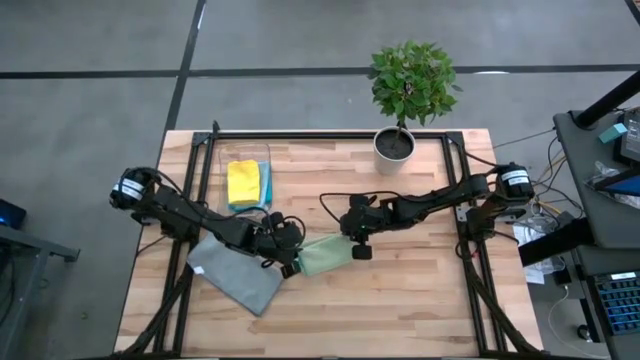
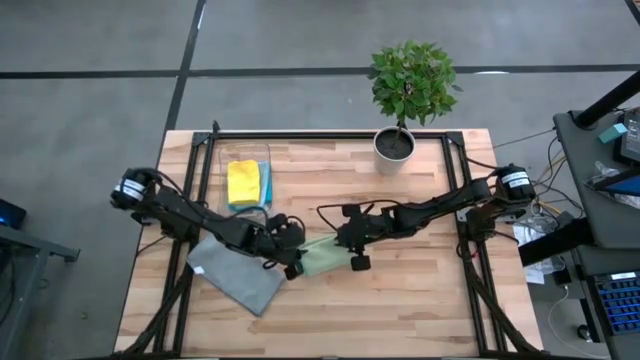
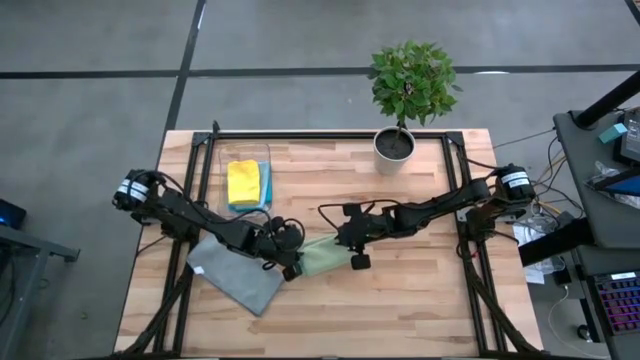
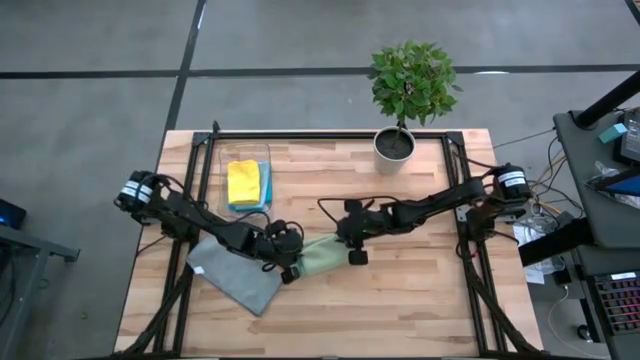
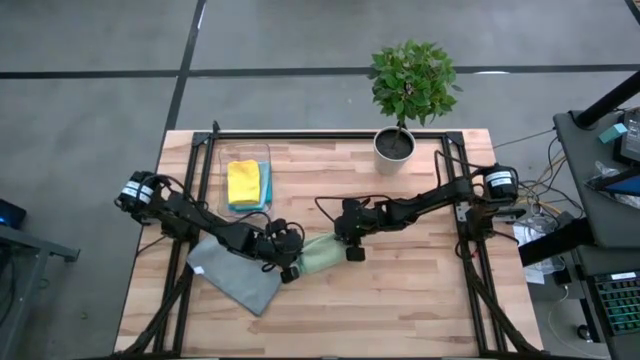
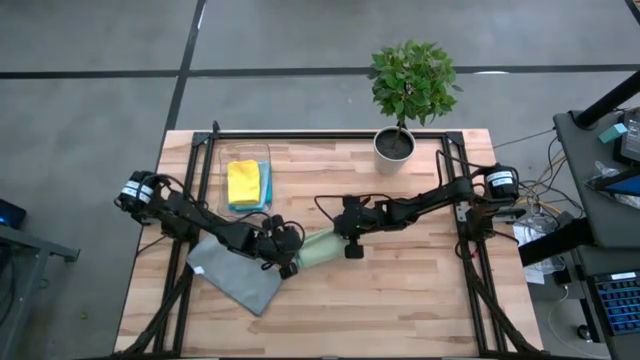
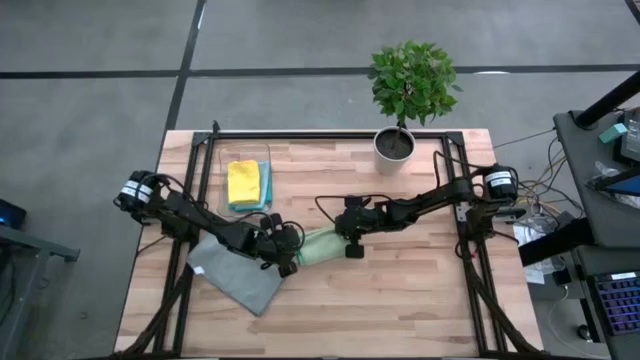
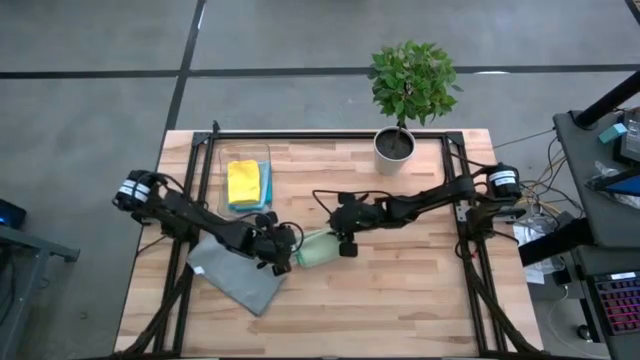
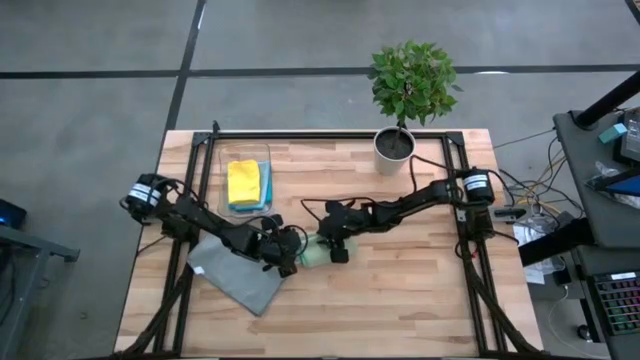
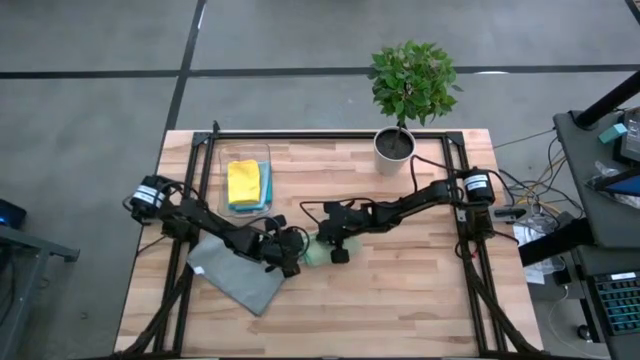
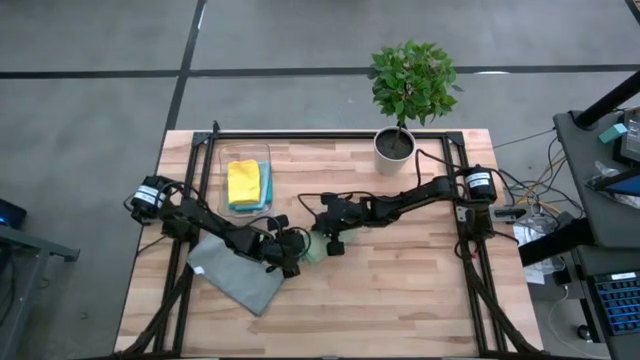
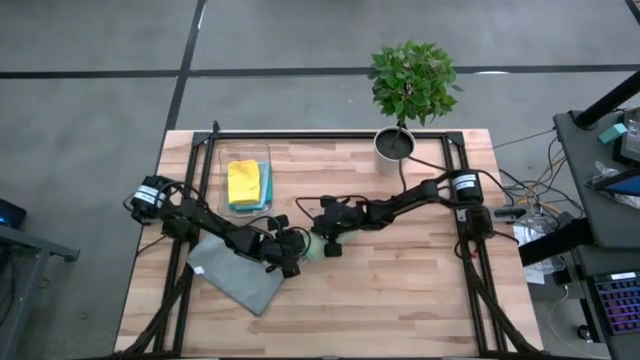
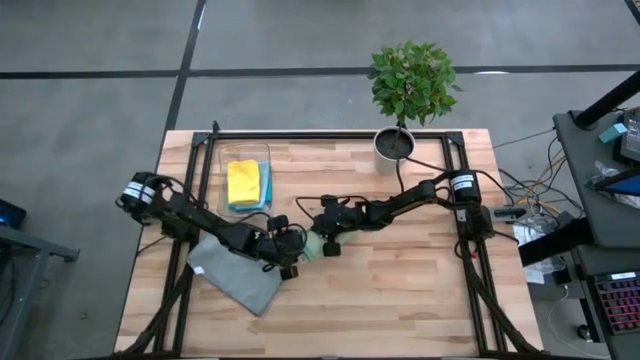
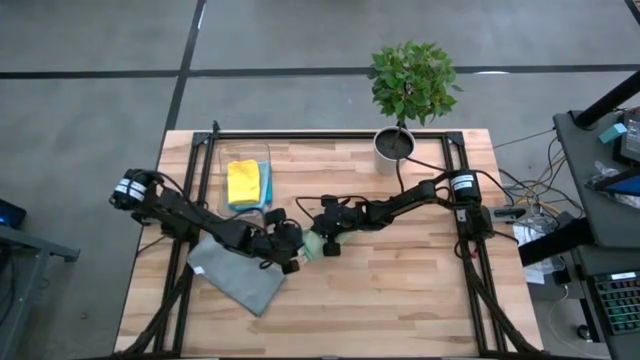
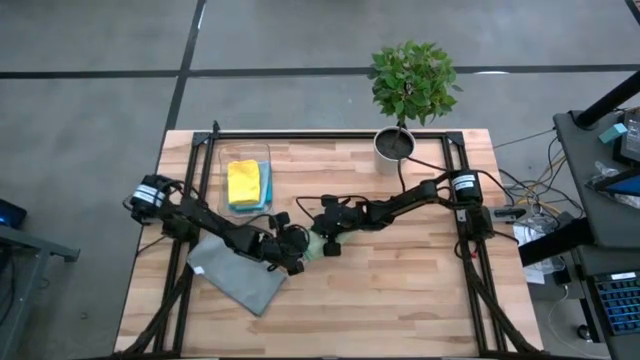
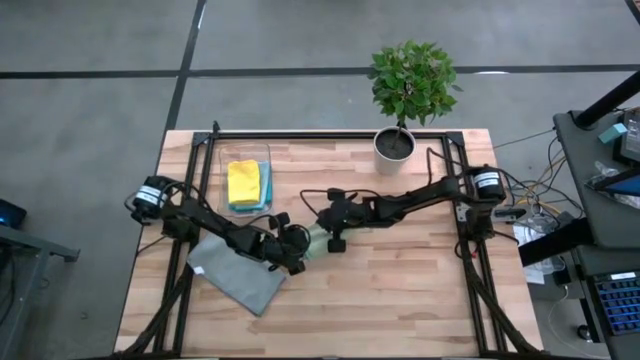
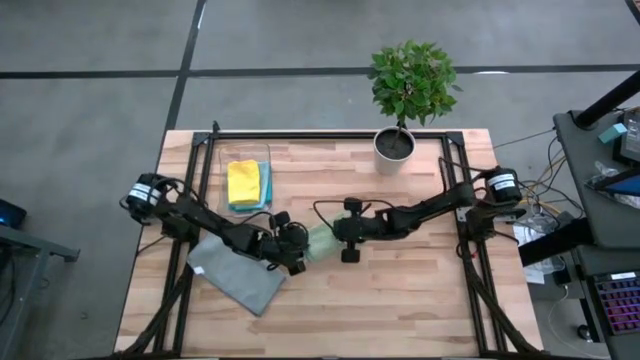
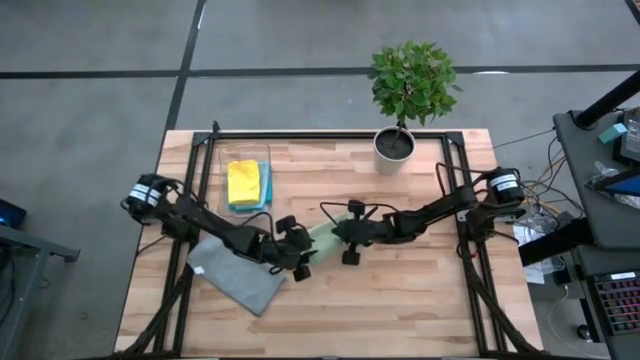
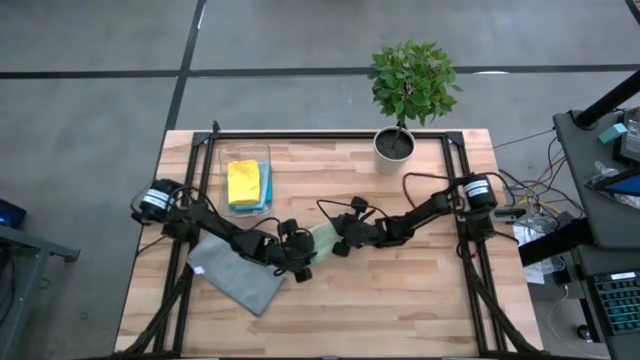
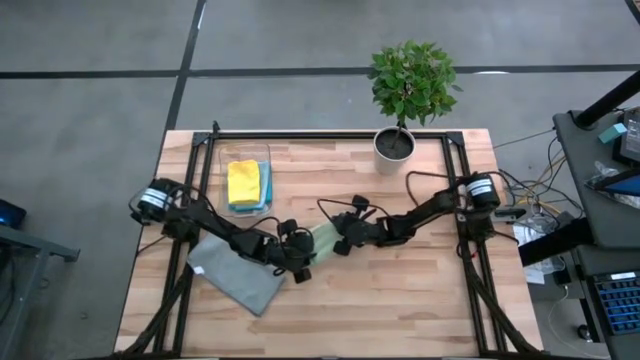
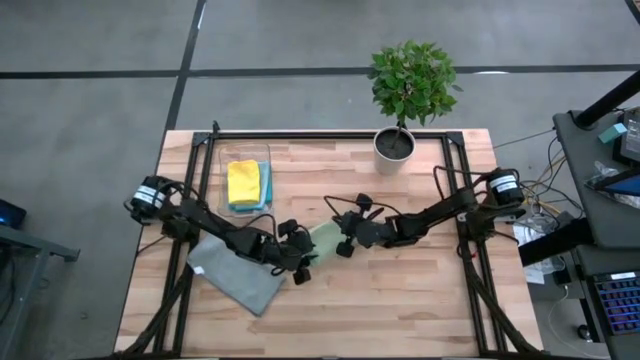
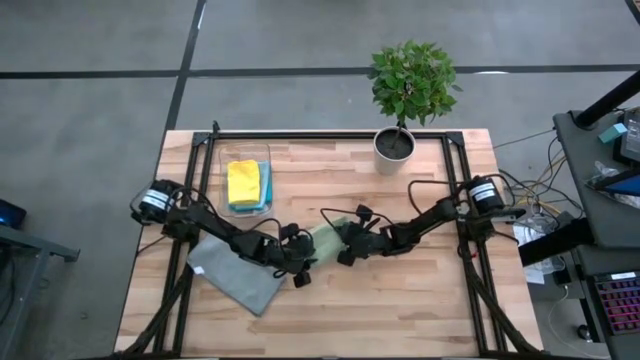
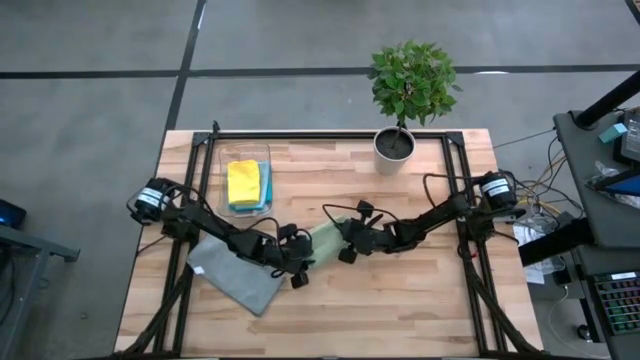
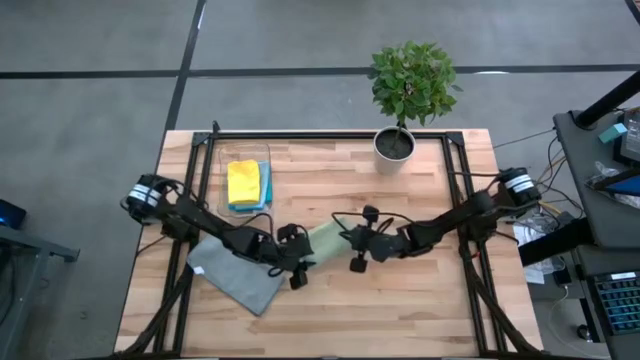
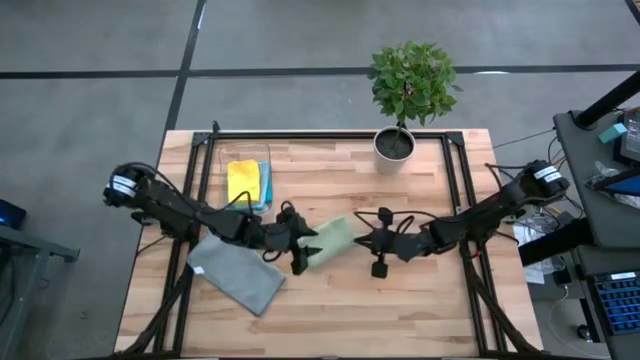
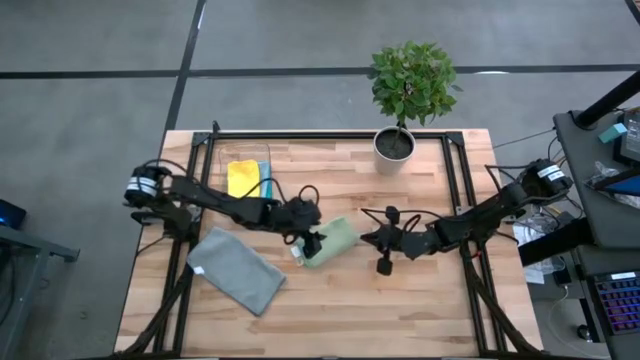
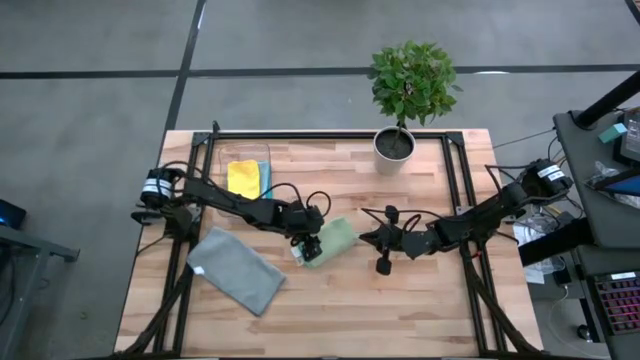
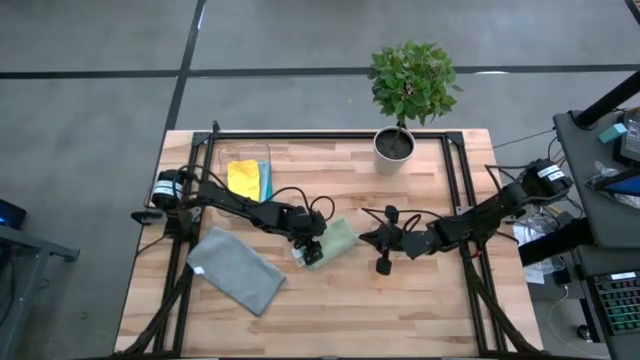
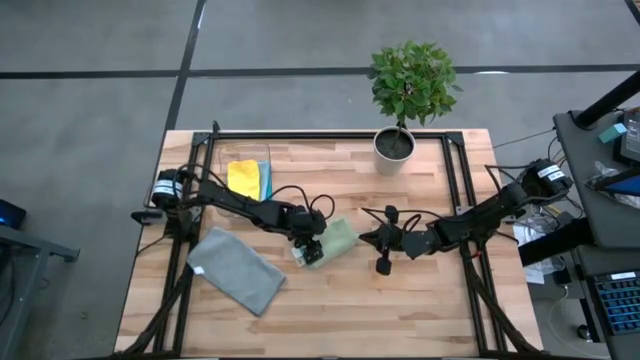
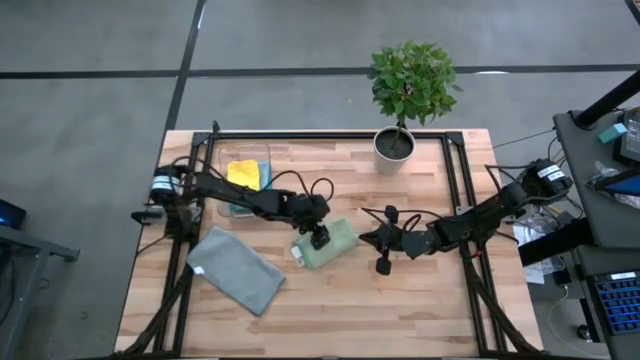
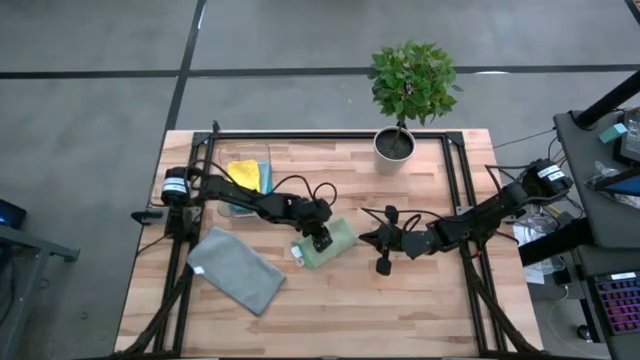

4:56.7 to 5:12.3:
Task: Fold microfiber towels
Stack the folded light green microfiber towel on top of the yellow microfiber towel on the bin

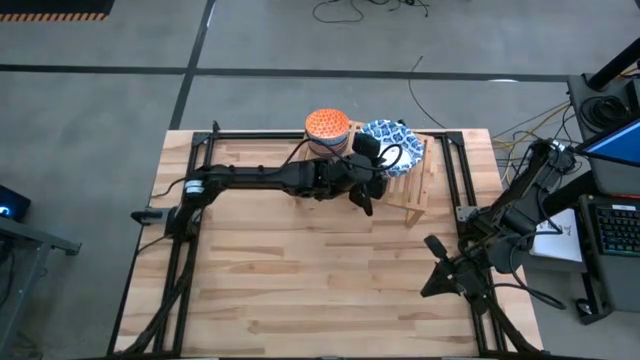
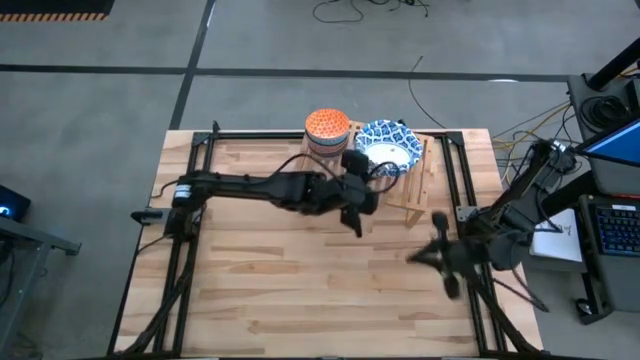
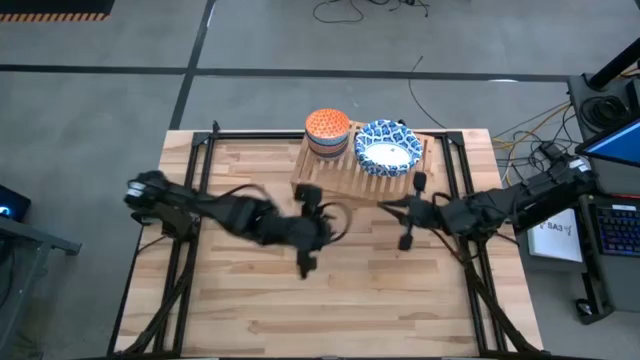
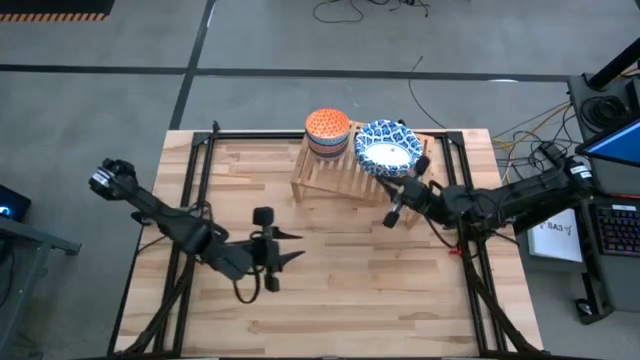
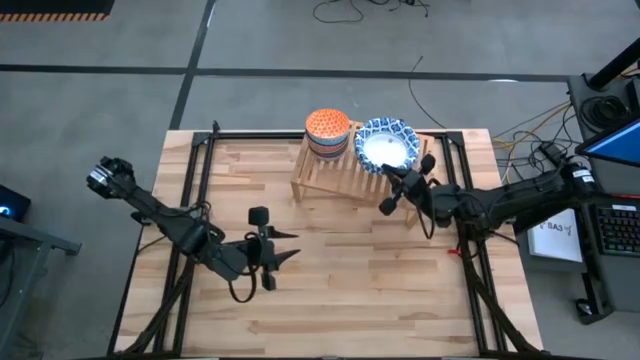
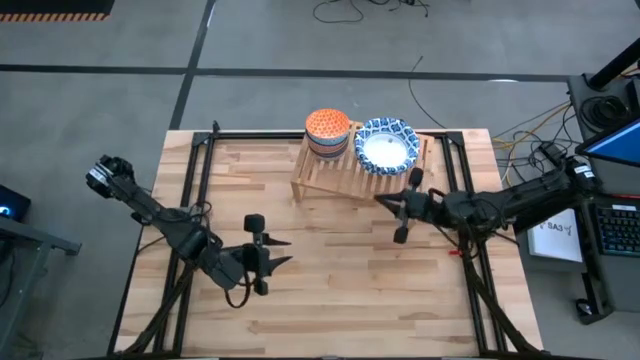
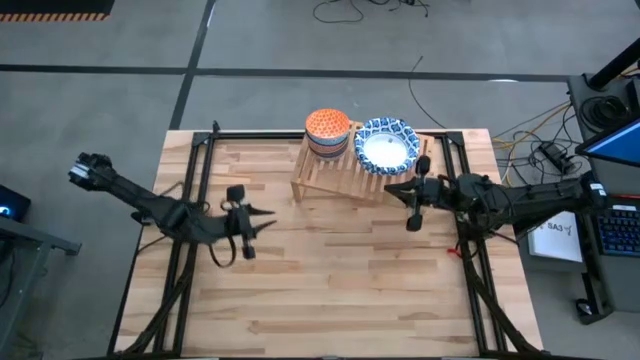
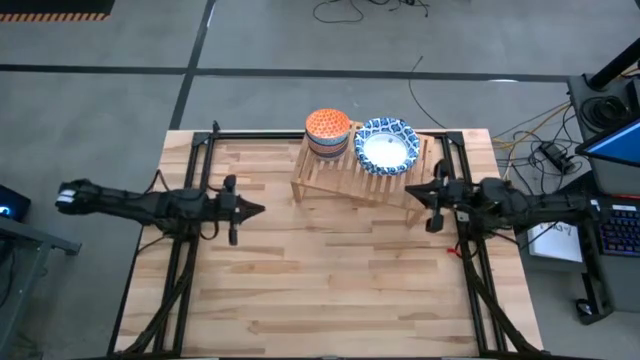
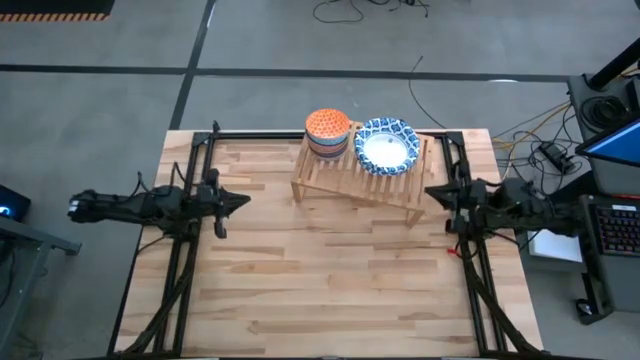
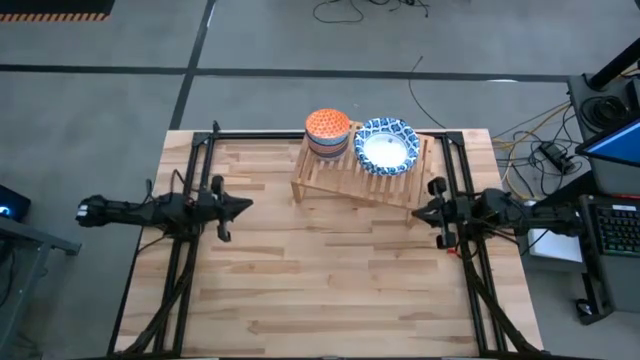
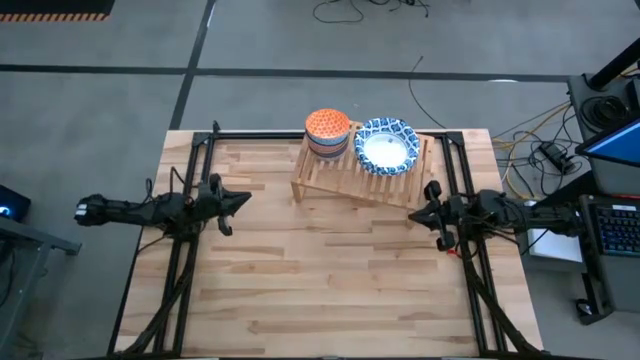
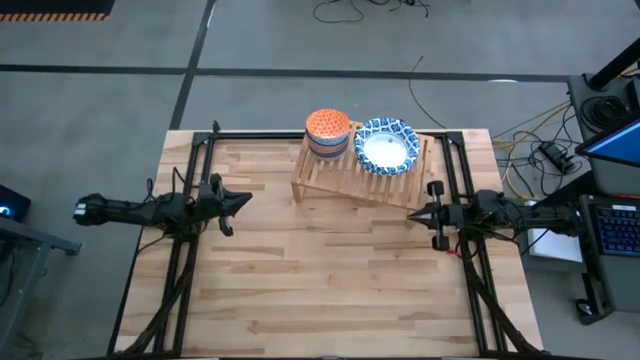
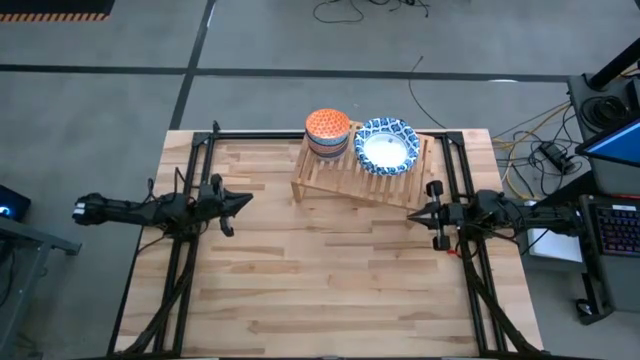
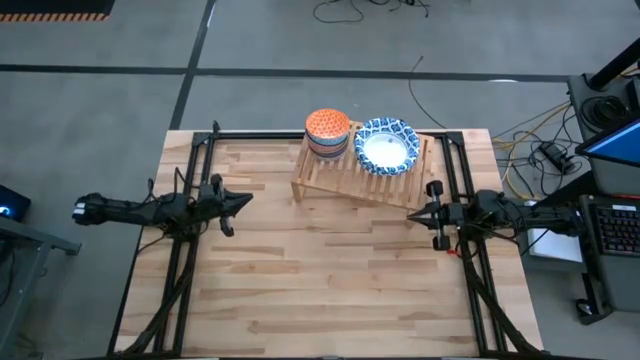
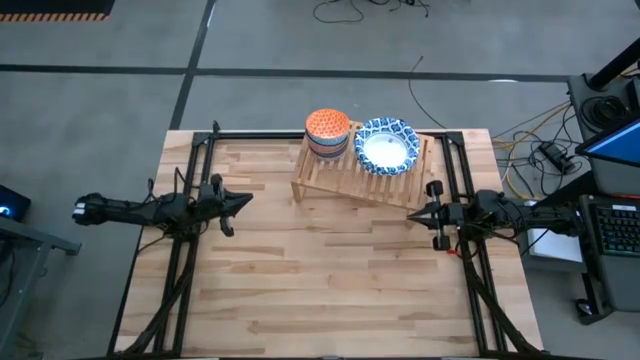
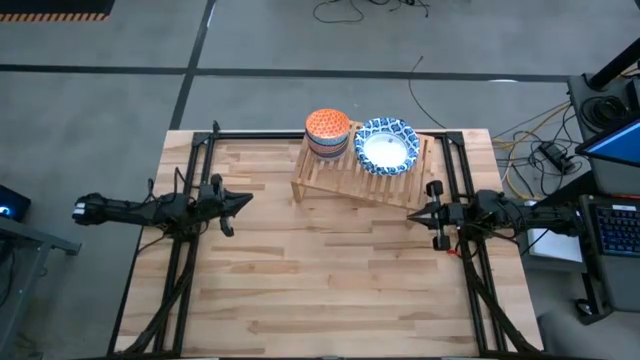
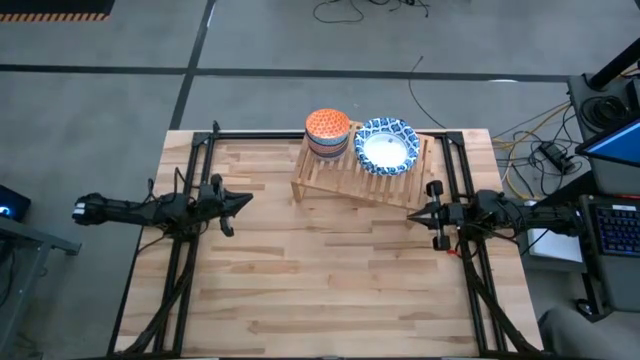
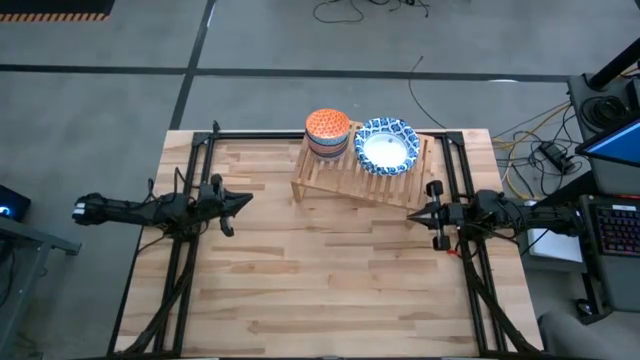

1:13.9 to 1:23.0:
Task: Place and stack bowls onto a shelf
Return to Home Position
